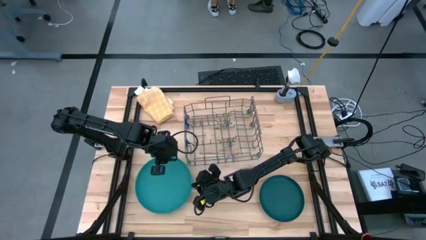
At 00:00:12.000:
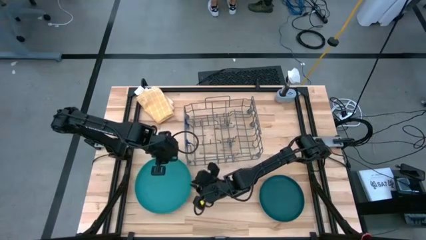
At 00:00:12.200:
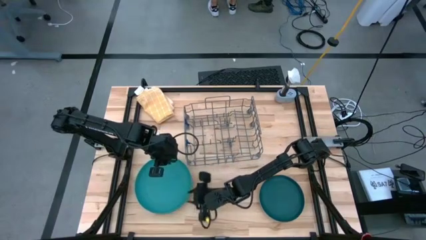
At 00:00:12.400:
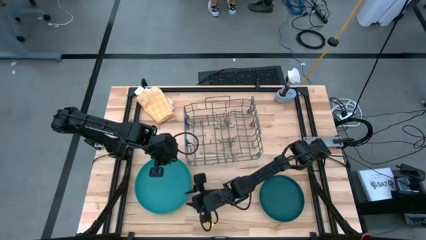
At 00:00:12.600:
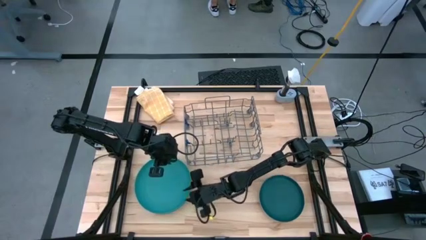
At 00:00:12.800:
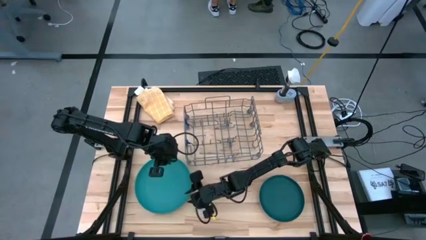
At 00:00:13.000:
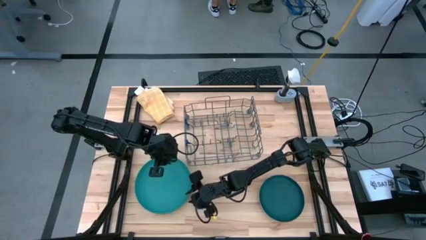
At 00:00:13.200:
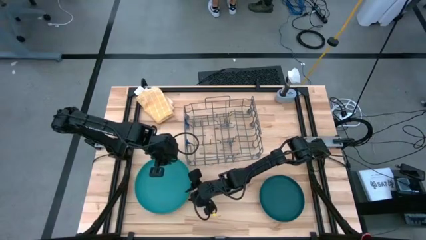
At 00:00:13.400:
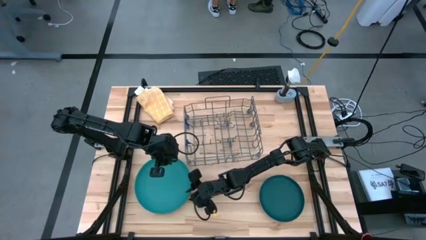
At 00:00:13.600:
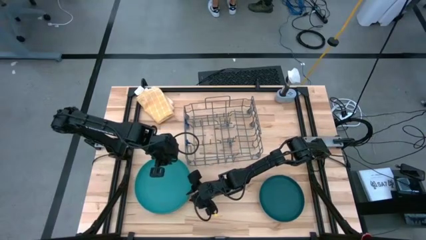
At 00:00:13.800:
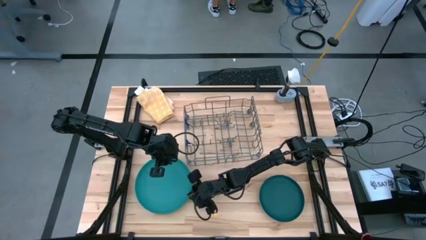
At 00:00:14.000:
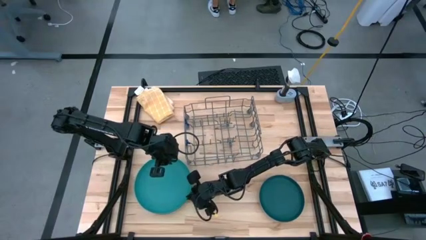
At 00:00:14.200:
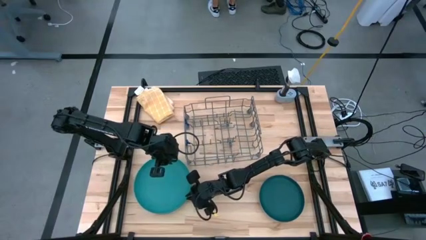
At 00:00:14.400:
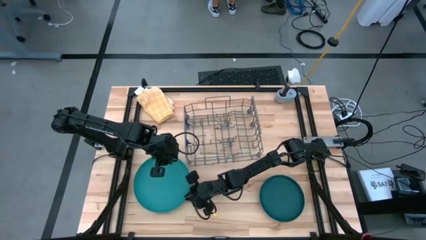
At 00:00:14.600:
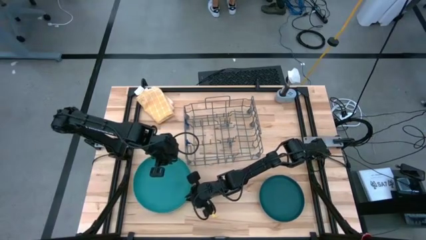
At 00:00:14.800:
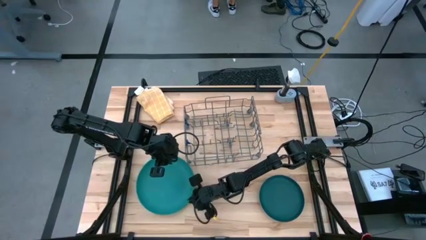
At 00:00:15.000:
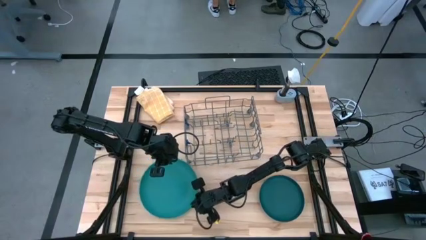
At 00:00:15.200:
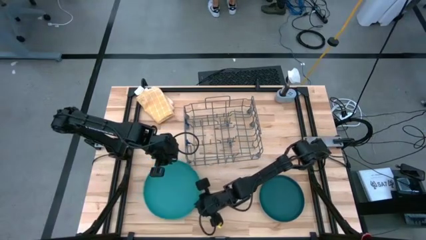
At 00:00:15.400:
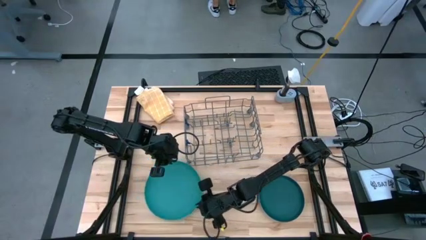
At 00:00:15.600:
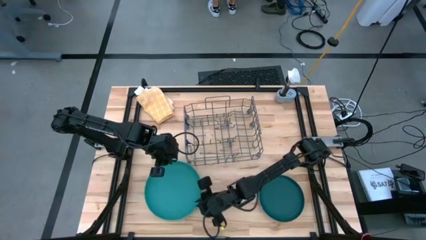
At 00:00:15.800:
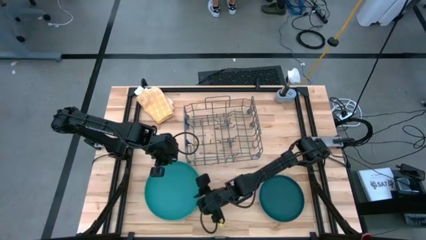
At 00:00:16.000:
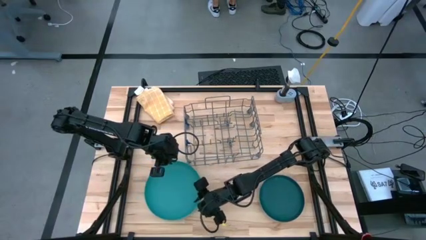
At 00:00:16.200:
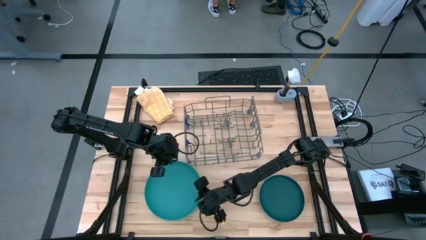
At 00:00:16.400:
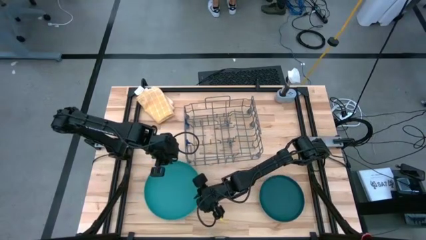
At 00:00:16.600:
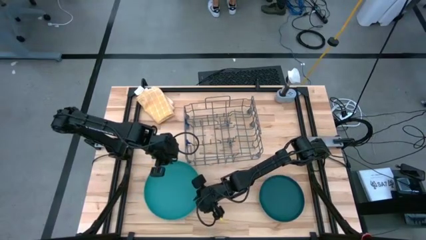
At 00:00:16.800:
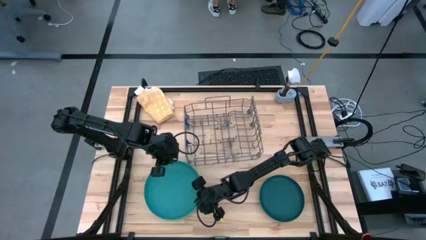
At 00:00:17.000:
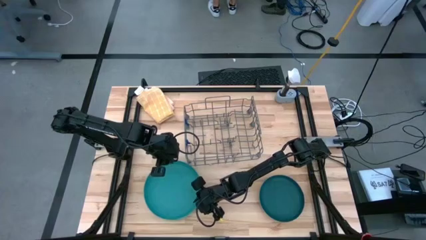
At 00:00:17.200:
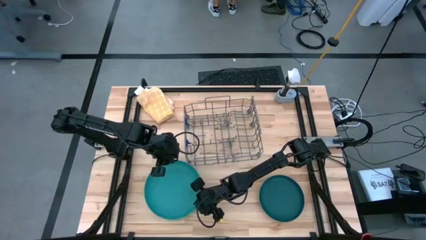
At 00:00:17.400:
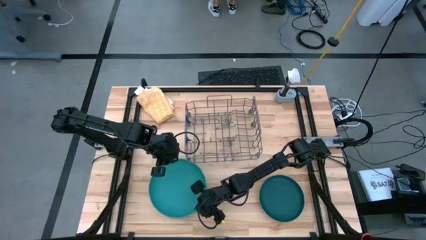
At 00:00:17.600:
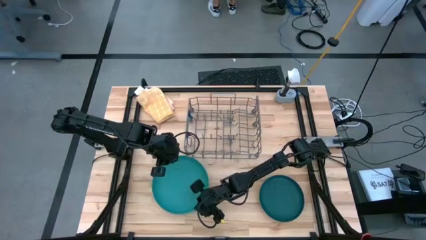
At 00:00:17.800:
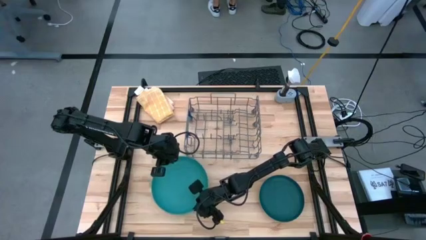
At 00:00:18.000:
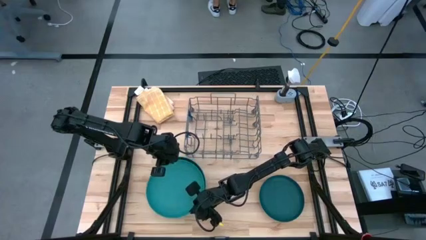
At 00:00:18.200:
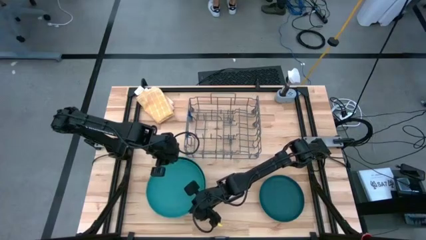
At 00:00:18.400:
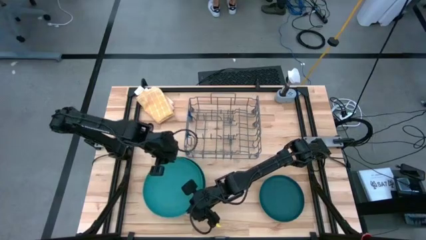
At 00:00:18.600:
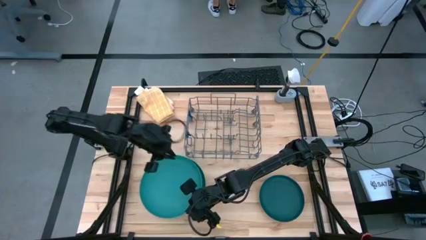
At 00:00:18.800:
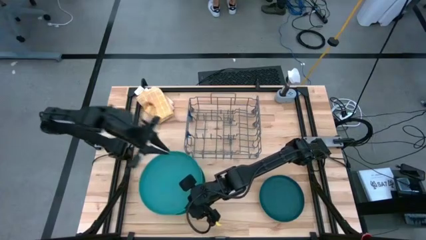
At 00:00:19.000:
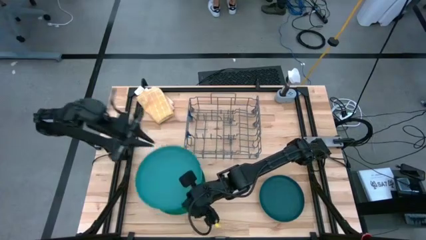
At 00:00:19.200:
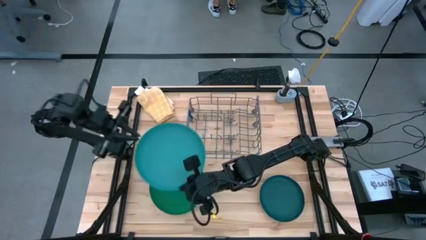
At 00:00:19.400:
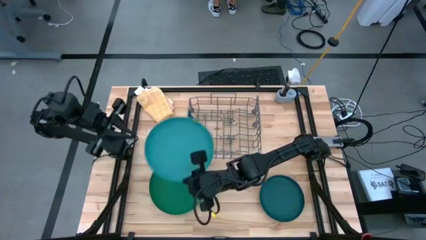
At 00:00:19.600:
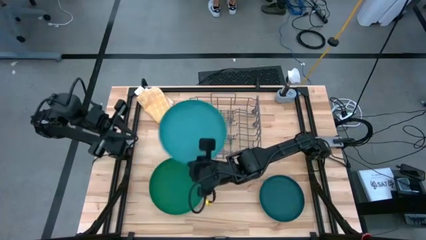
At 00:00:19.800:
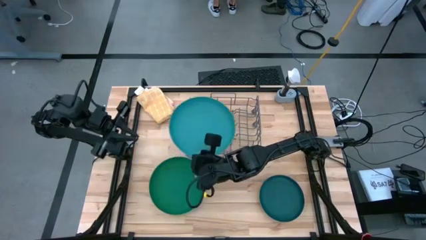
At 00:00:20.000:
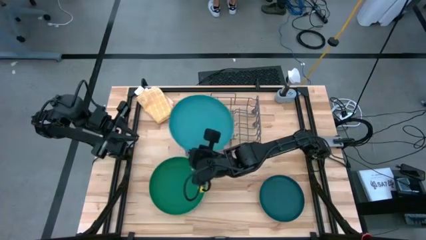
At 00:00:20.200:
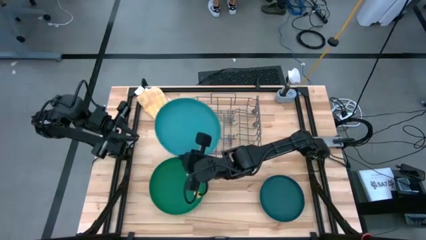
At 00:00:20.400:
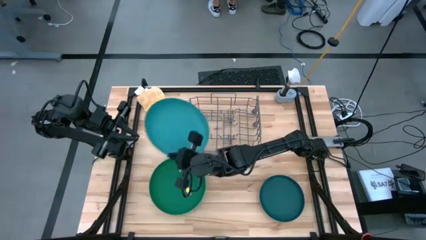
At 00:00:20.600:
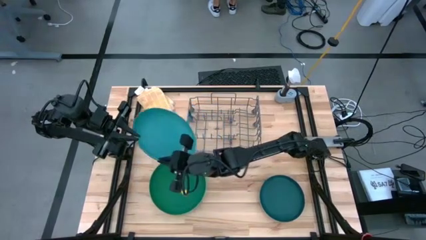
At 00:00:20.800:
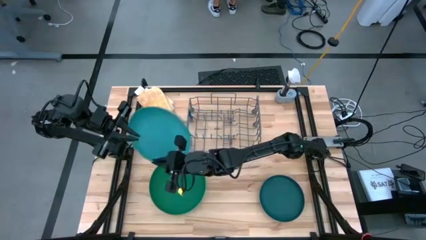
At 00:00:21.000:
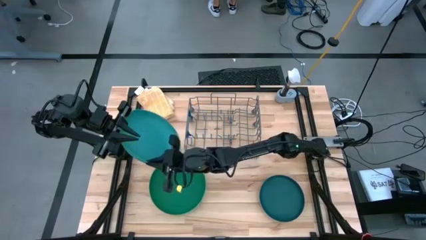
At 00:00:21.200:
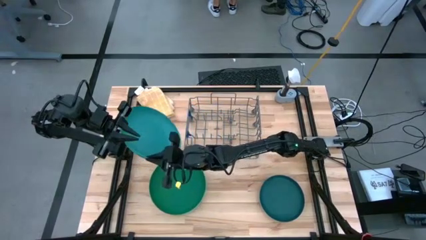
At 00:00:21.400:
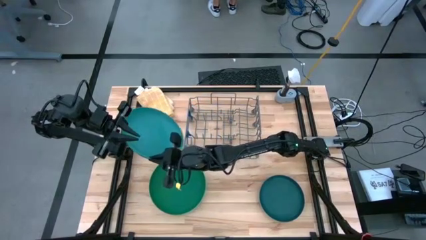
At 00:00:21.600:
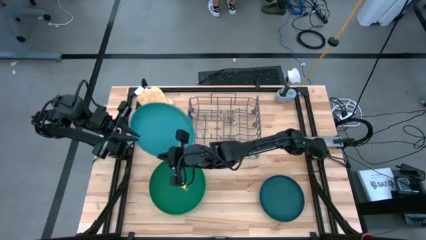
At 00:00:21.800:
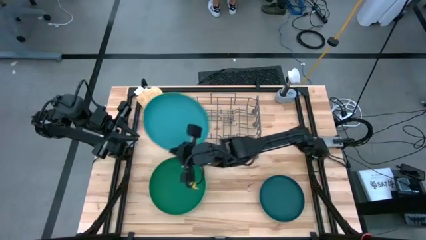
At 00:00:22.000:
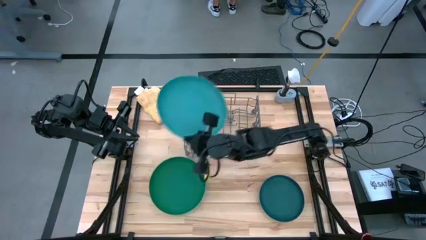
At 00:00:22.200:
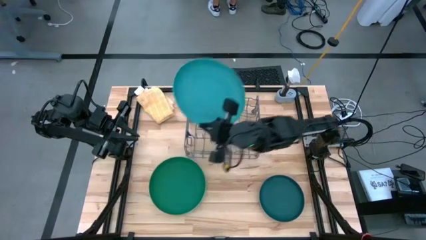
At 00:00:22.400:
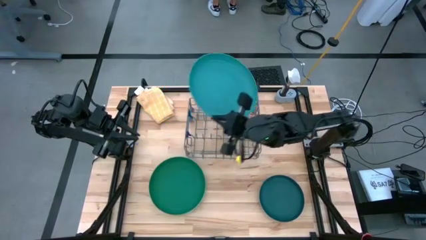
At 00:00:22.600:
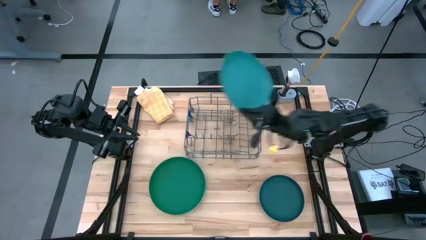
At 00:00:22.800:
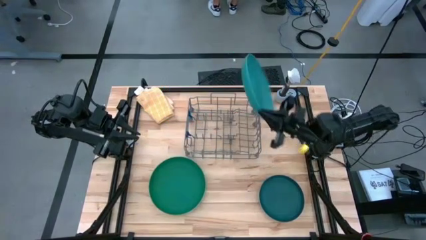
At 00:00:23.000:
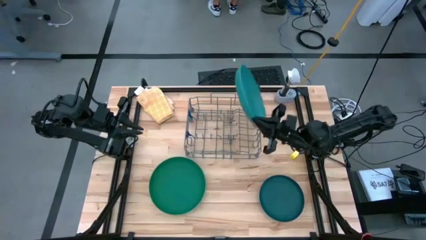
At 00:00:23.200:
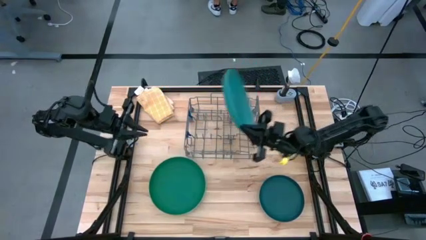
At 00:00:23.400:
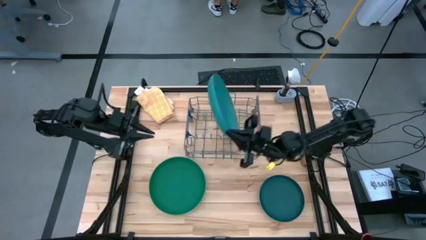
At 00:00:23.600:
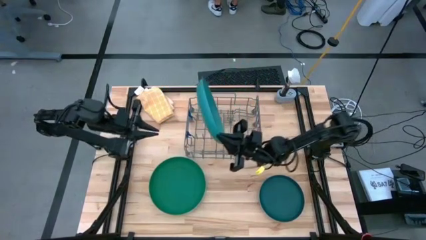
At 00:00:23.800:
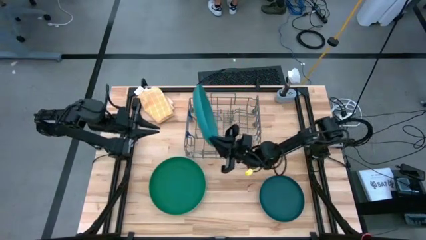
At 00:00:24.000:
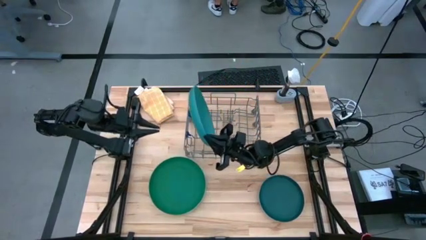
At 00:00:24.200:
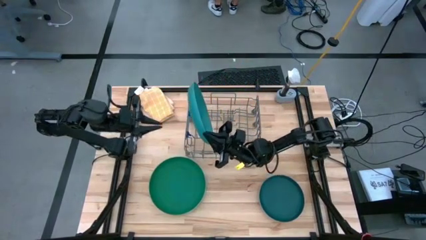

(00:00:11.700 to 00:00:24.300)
Task: Sort dishes
Put the blue plate into the dishwasher rack
